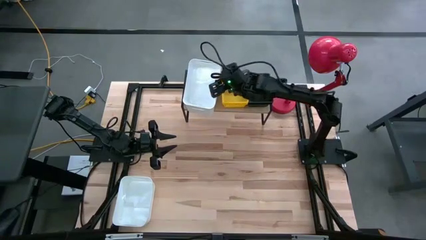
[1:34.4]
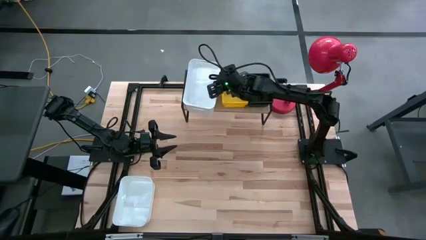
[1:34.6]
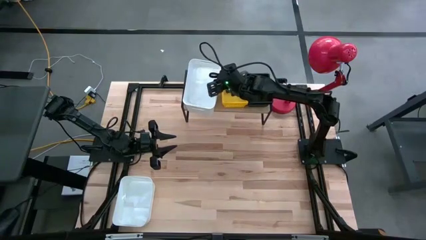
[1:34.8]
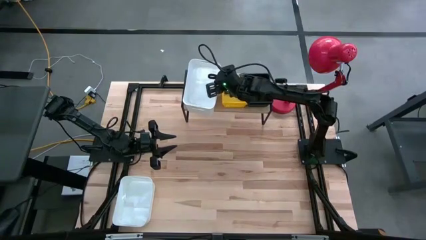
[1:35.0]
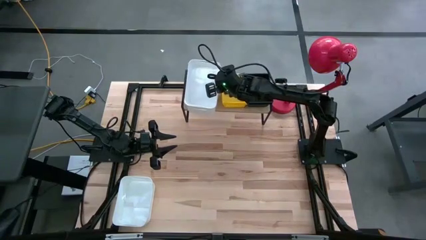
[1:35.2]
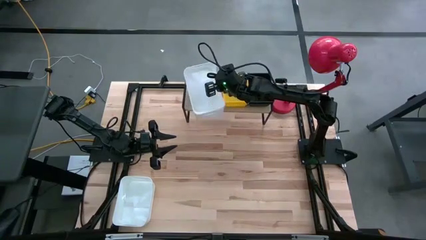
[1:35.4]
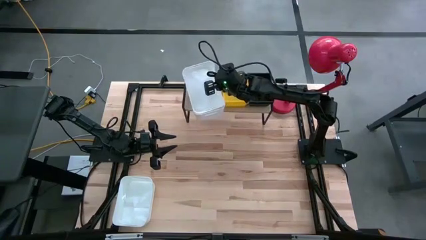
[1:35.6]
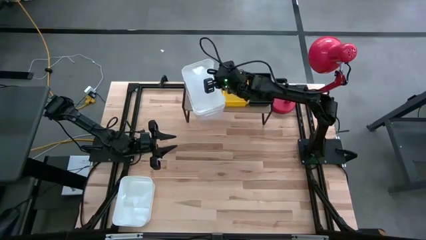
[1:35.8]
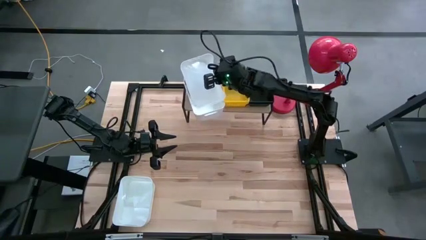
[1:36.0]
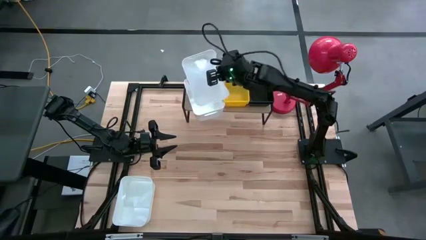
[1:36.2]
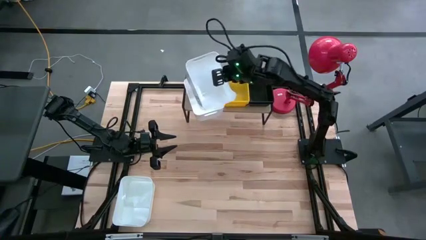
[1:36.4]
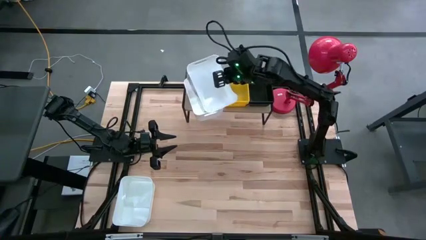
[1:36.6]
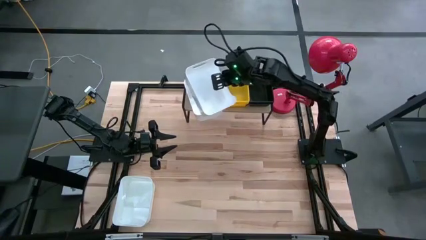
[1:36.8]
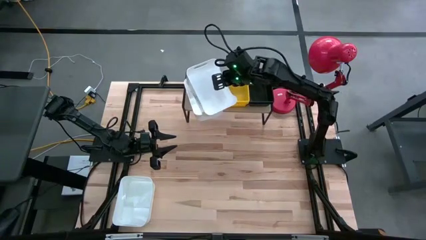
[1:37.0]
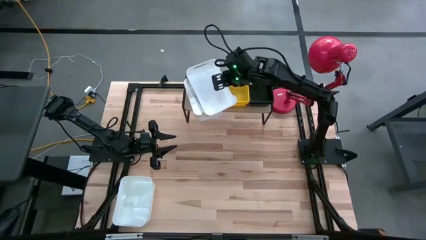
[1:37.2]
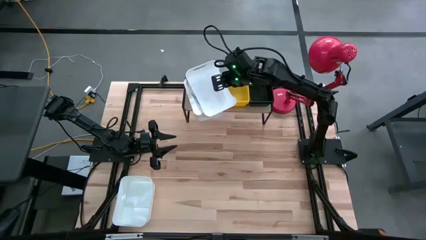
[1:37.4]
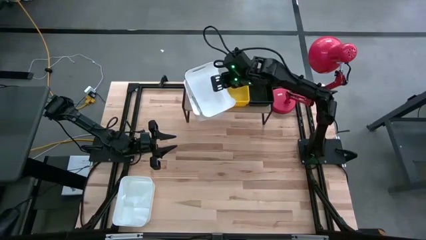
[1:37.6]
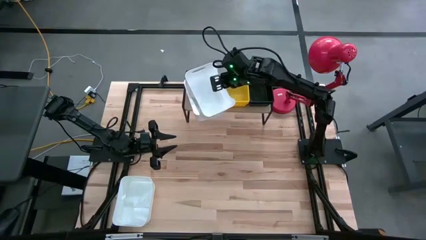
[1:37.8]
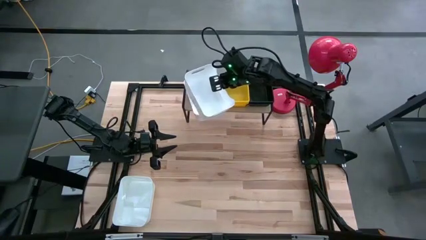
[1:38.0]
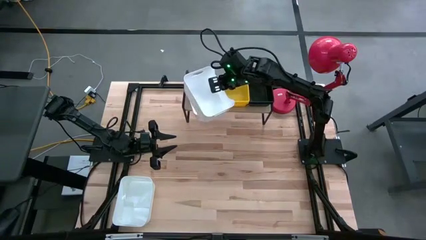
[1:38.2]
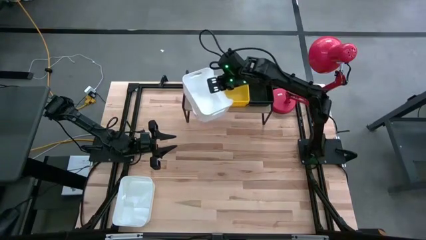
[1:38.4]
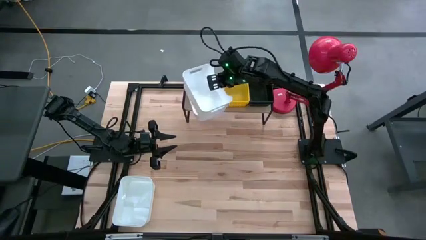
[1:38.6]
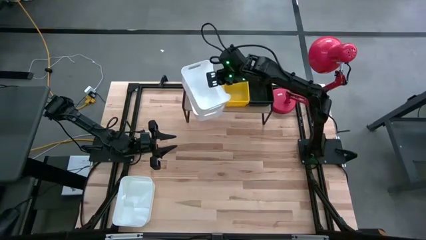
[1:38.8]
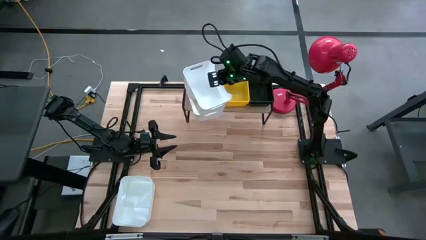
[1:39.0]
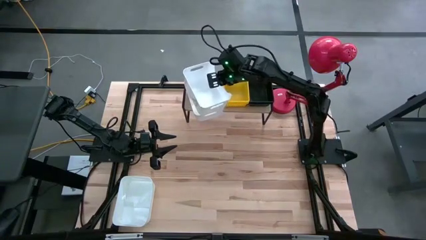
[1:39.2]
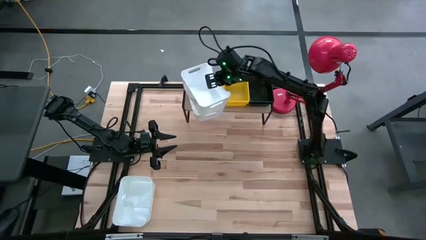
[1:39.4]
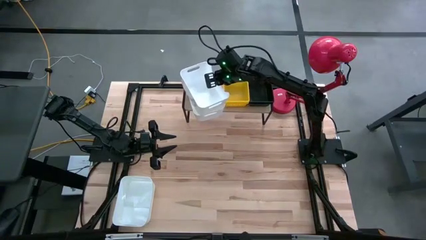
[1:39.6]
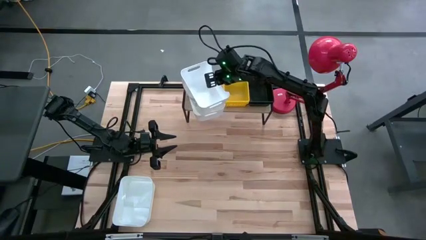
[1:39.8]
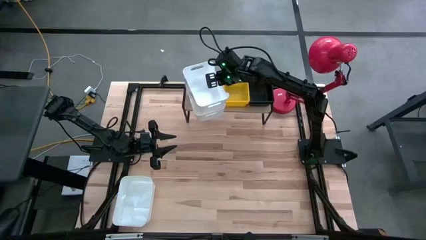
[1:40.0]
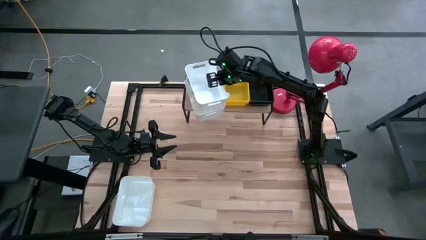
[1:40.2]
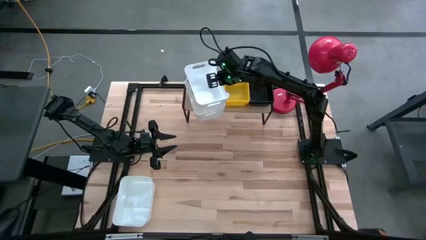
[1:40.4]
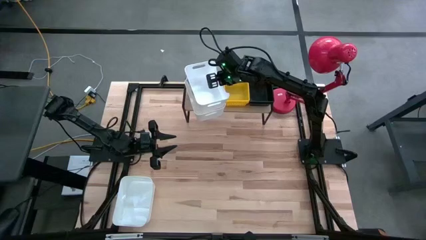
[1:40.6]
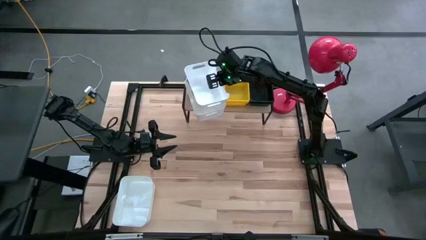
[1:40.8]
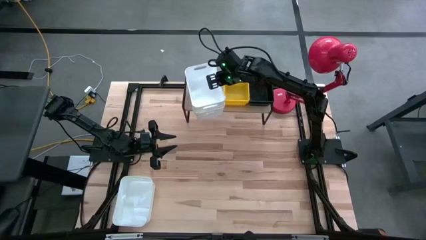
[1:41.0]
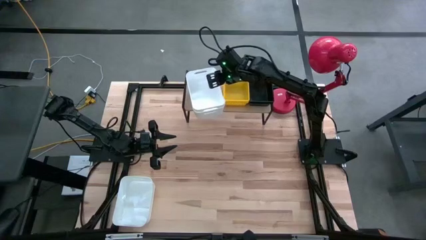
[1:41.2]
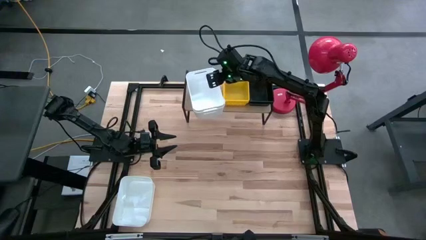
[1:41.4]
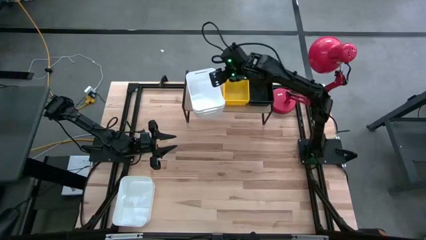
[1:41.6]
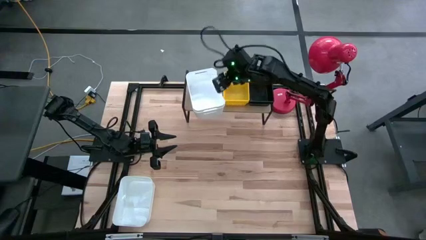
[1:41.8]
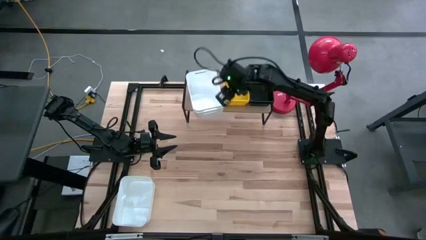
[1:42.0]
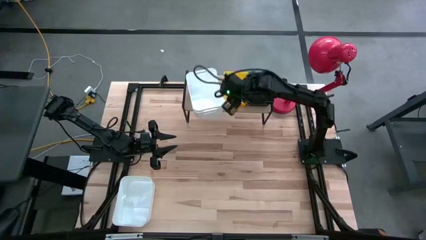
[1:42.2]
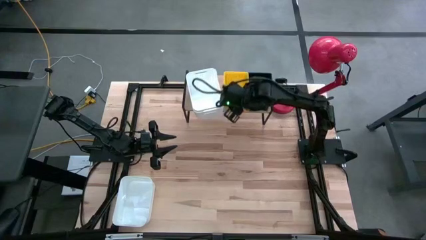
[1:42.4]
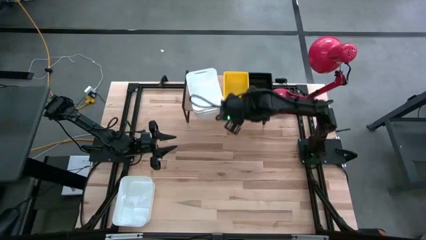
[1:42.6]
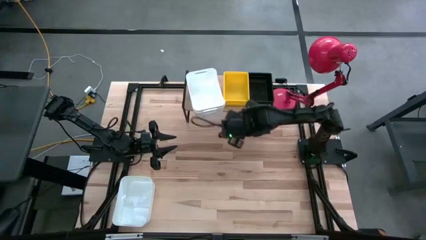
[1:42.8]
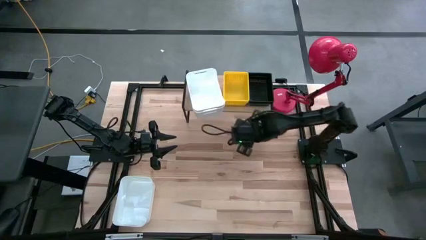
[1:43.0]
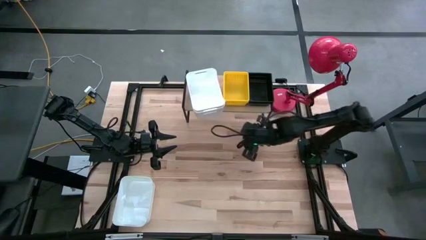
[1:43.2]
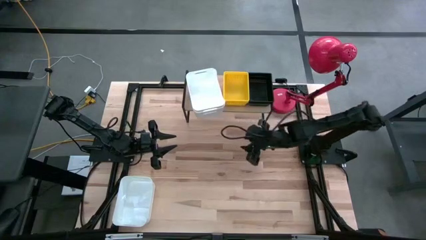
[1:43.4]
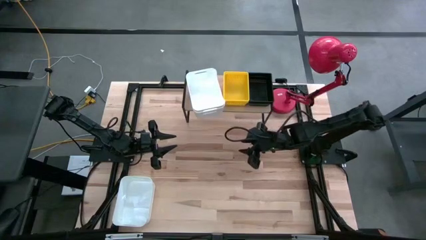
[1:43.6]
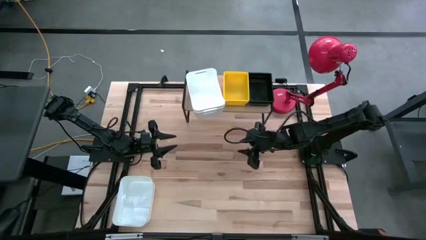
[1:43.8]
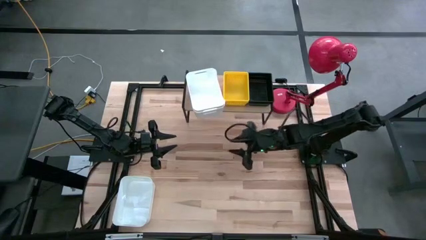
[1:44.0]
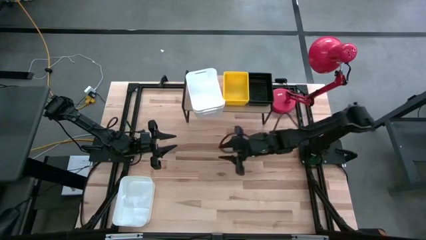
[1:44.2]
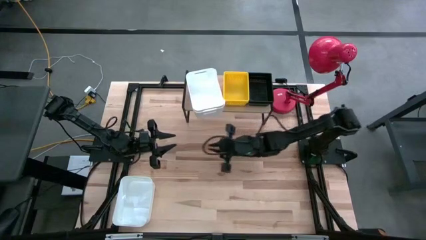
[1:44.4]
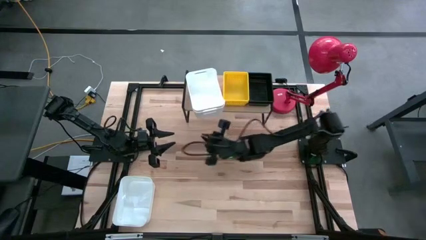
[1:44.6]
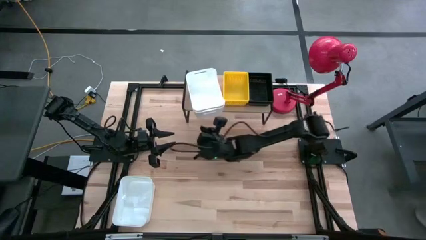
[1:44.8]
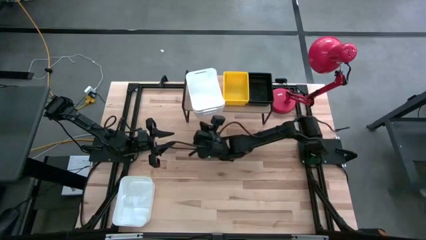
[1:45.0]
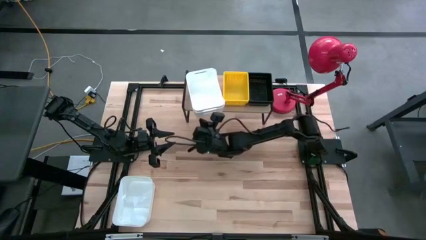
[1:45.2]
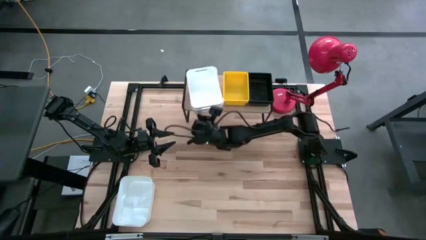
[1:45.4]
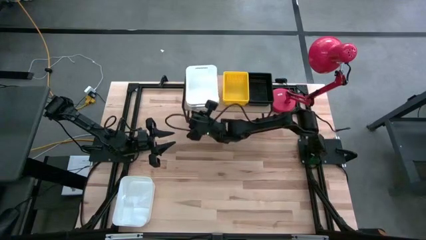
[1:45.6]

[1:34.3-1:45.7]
Task: Stack baskets on shelf by color
Stack the right white bin on the other white bin on the shelf

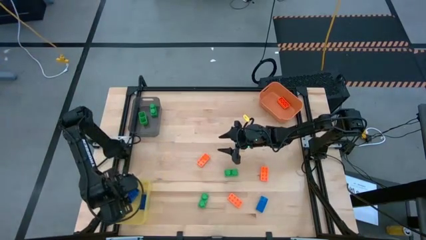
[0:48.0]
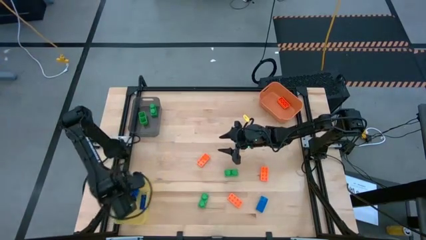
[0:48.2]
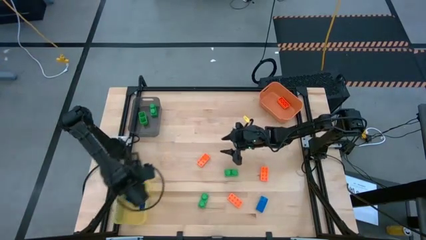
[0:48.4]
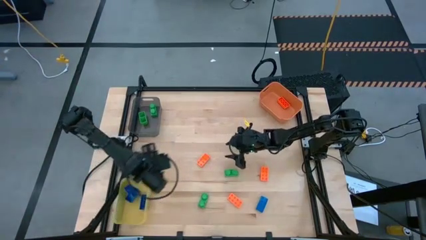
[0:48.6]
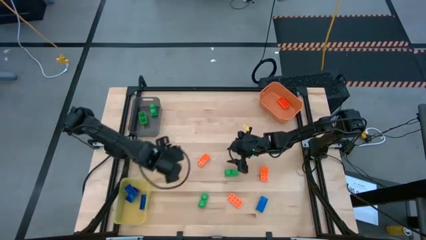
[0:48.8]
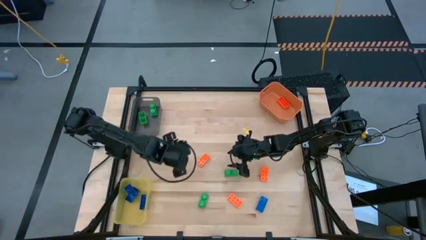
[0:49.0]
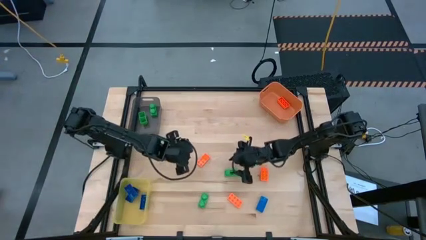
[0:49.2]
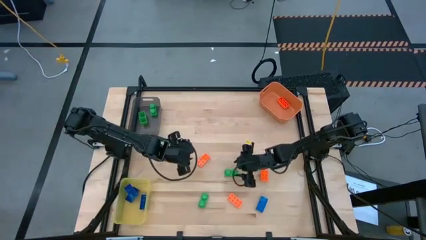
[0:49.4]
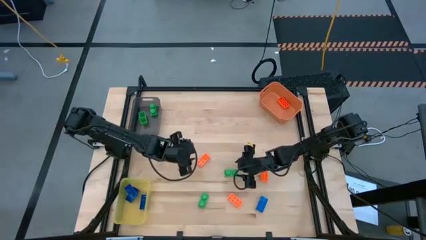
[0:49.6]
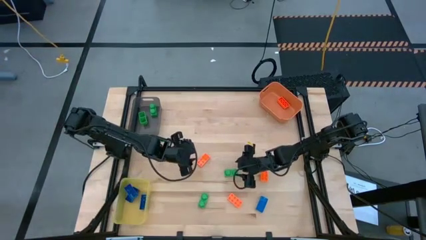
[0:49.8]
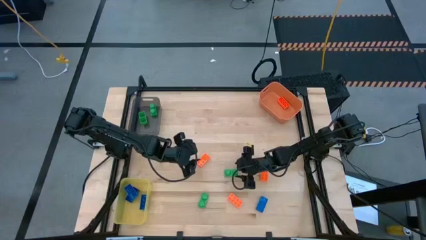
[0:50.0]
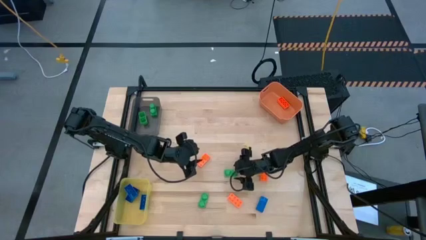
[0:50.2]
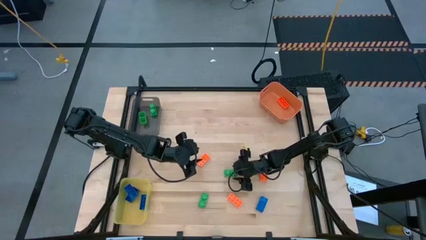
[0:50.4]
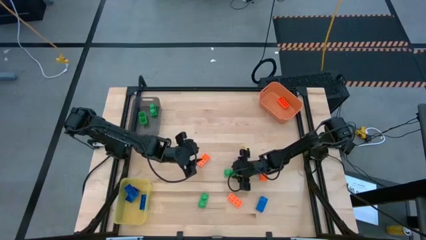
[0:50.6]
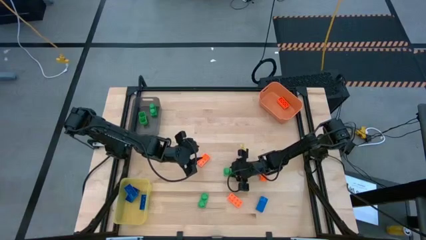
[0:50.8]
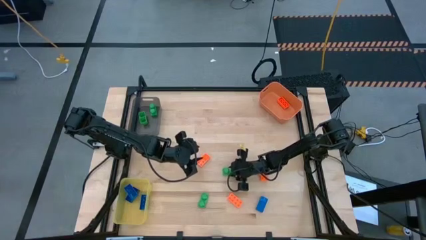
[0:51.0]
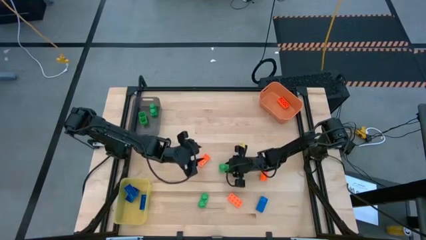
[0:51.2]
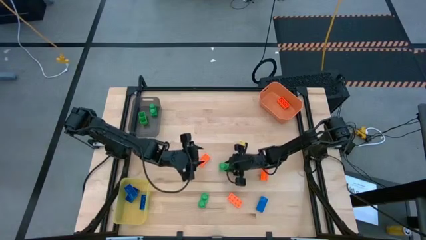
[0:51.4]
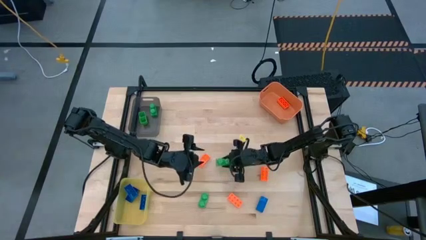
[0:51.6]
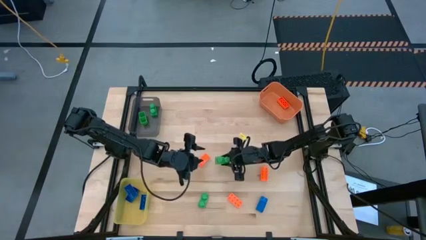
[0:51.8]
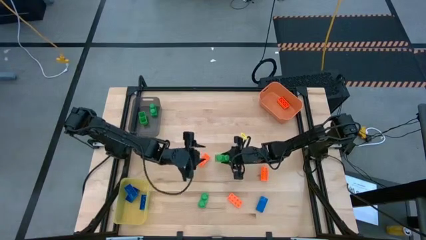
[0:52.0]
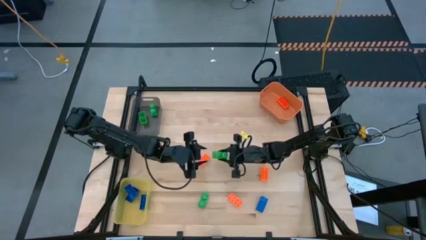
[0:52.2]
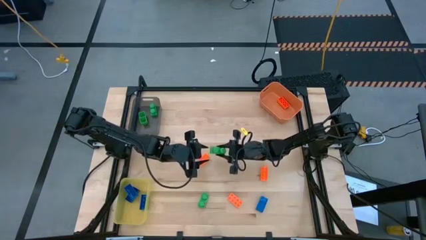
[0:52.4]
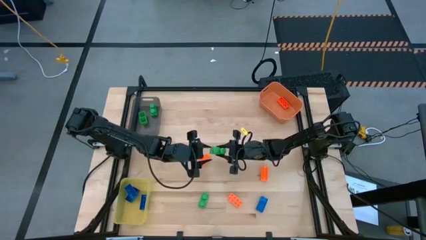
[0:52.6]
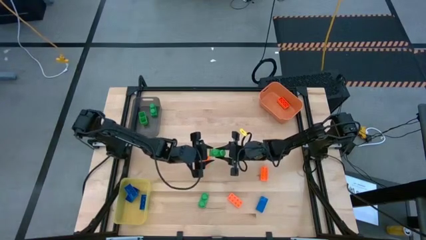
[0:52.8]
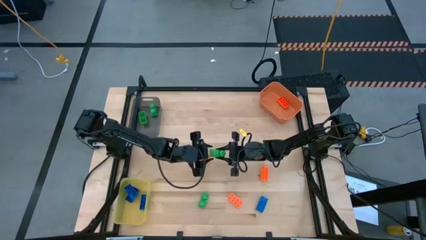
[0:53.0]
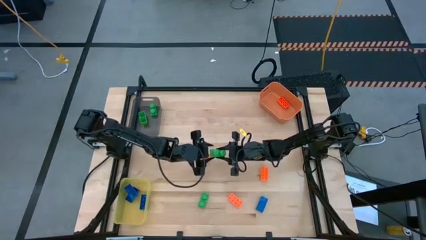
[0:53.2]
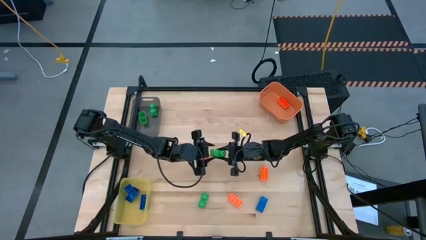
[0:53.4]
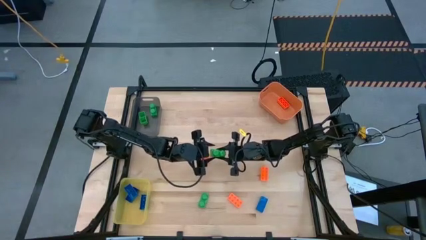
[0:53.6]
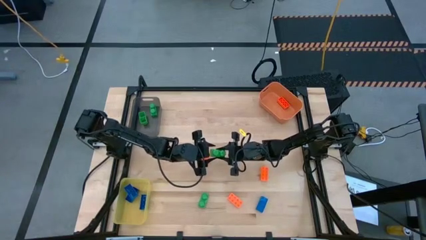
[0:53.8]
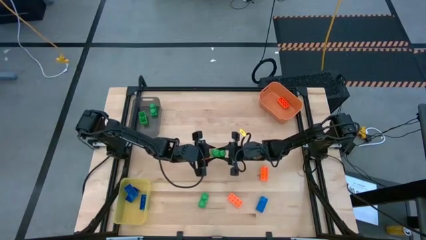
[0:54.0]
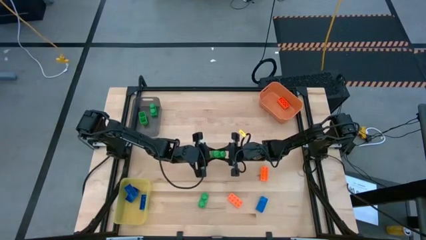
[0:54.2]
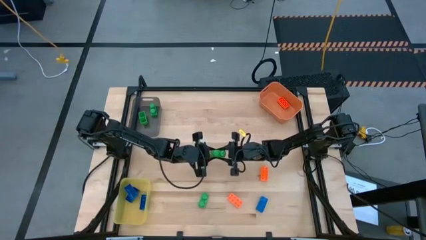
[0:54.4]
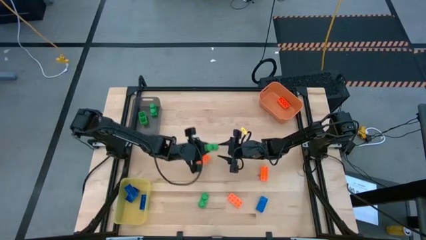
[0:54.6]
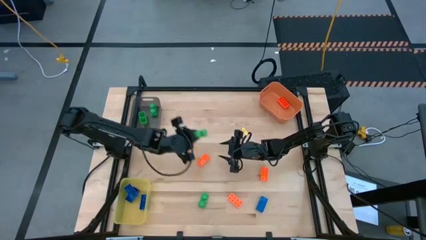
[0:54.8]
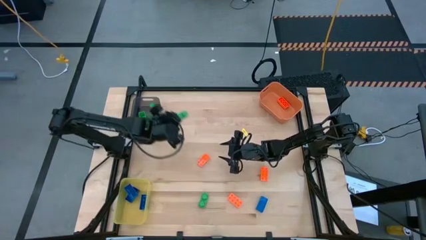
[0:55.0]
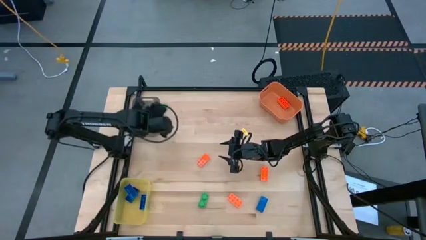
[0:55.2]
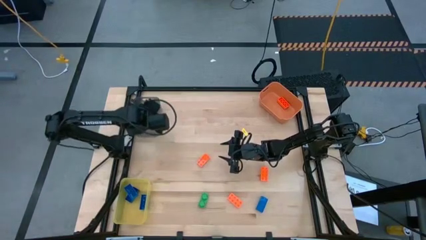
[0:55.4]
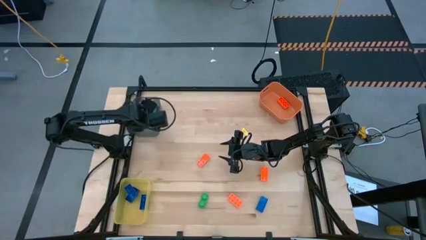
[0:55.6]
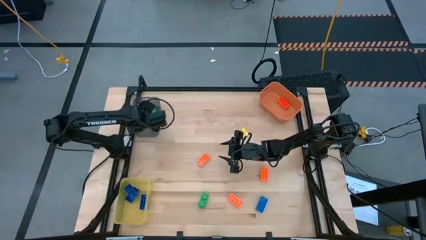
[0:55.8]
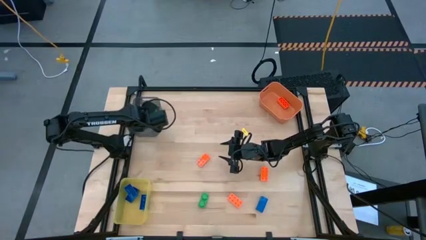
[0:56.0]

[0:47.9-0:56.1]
Task: Sort & place blocks by color
Put the green game piece into the black bin
